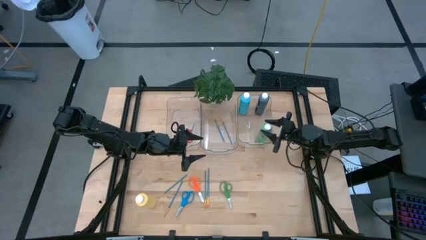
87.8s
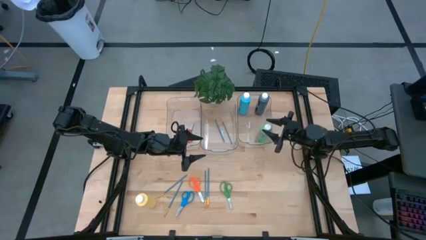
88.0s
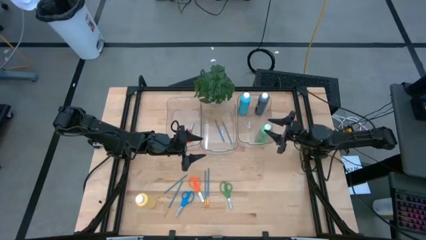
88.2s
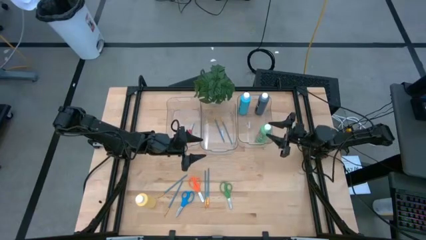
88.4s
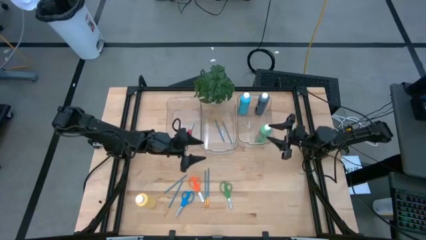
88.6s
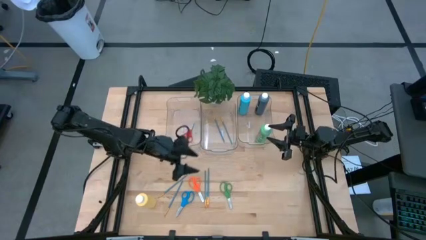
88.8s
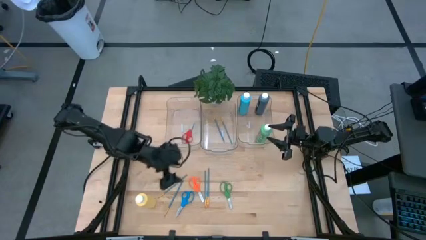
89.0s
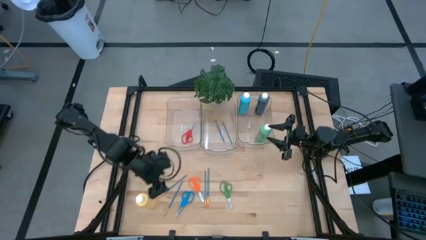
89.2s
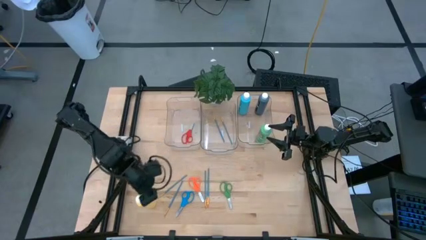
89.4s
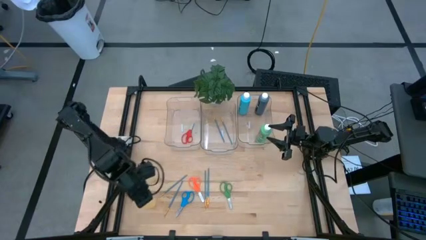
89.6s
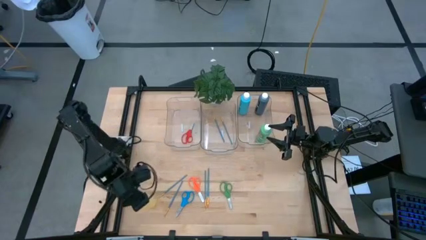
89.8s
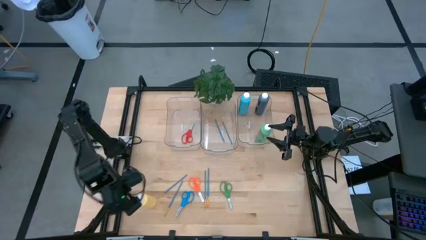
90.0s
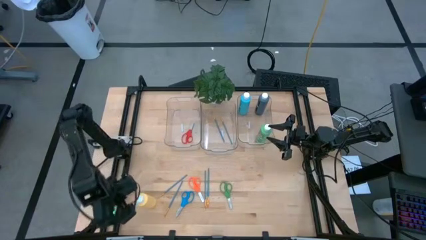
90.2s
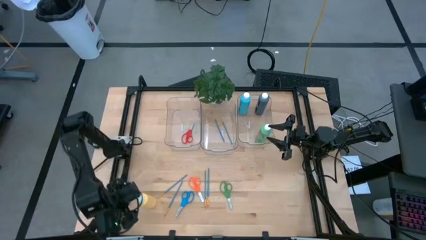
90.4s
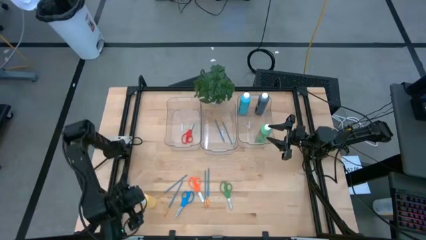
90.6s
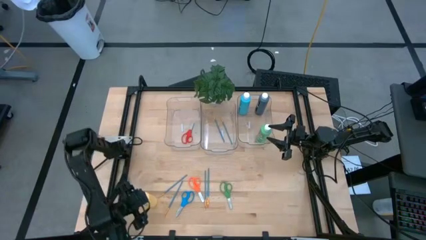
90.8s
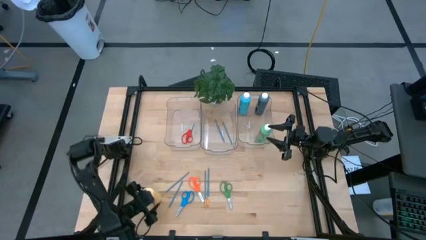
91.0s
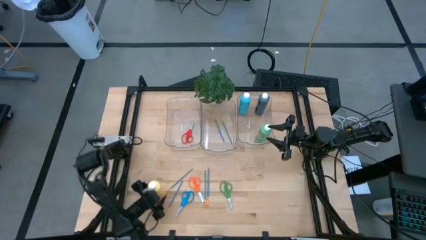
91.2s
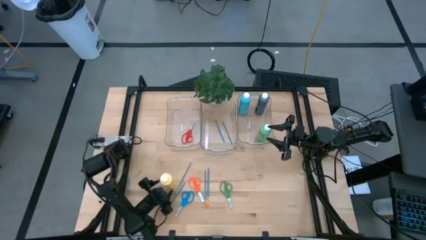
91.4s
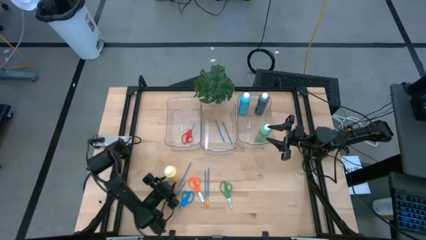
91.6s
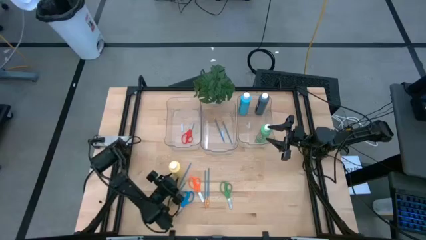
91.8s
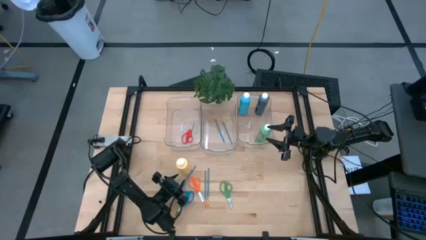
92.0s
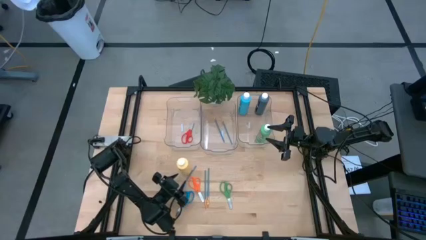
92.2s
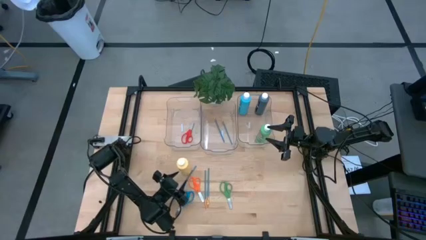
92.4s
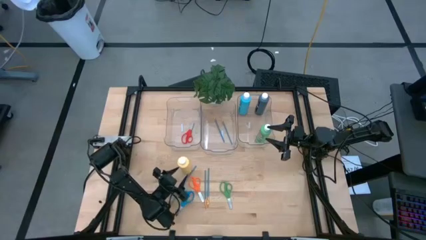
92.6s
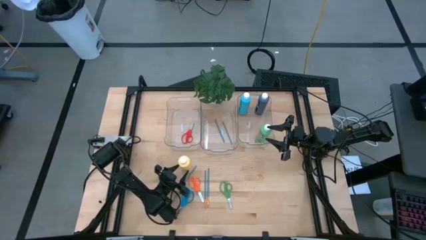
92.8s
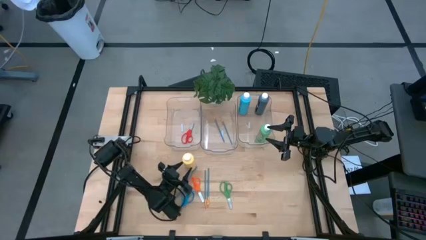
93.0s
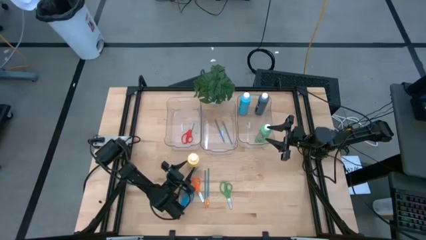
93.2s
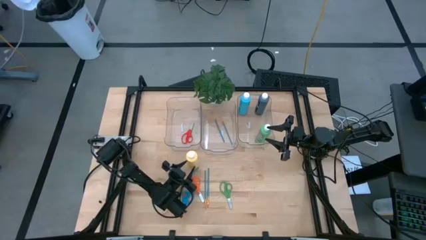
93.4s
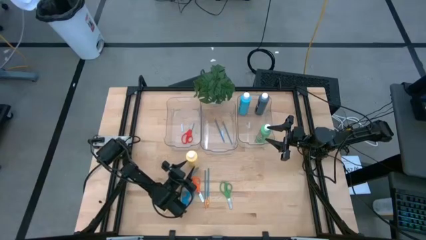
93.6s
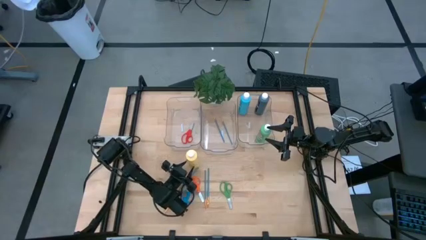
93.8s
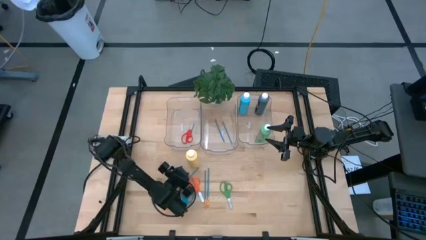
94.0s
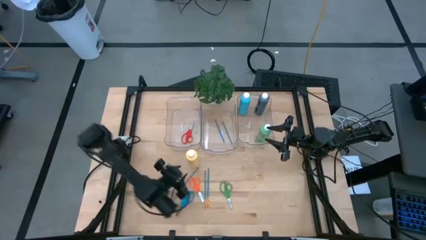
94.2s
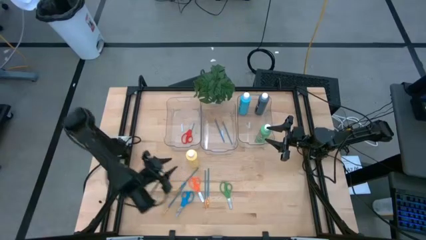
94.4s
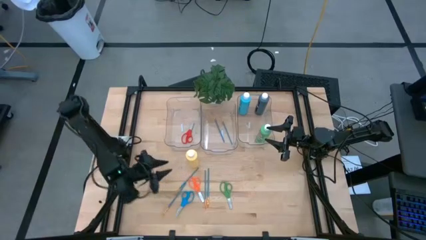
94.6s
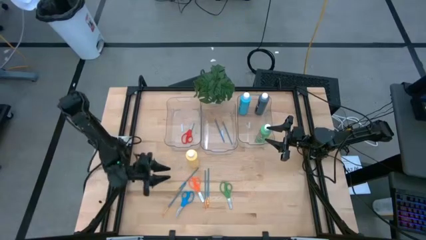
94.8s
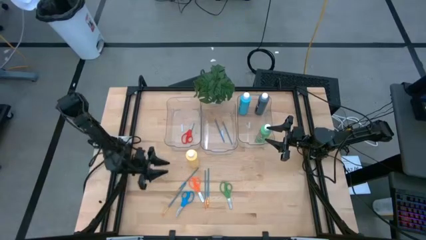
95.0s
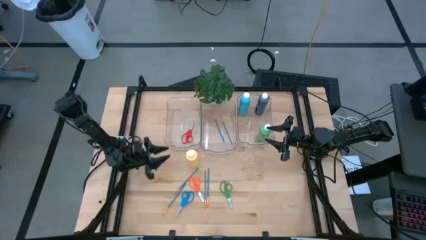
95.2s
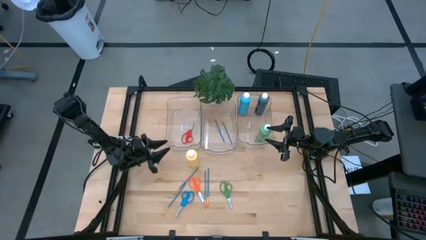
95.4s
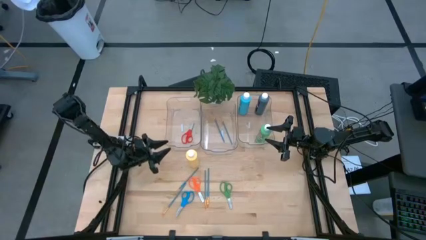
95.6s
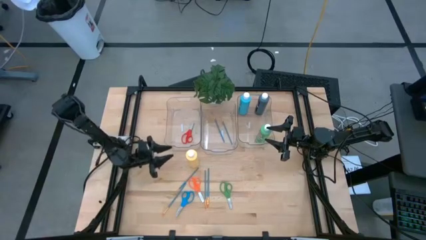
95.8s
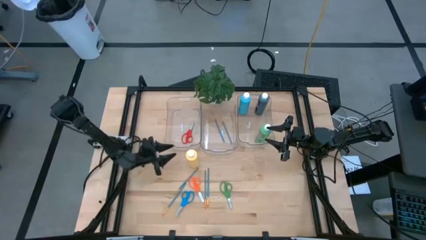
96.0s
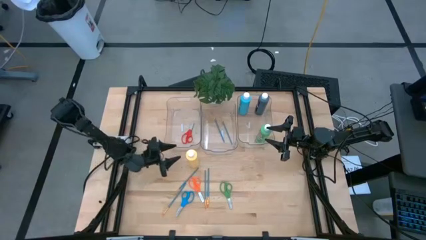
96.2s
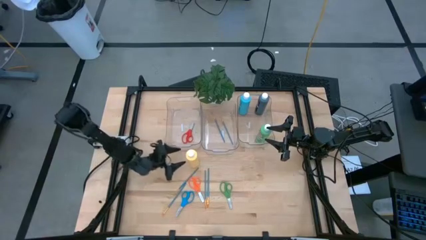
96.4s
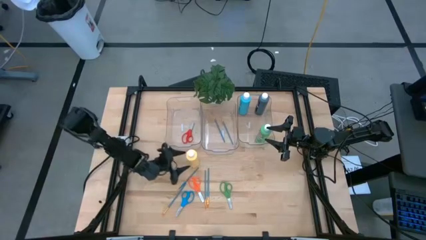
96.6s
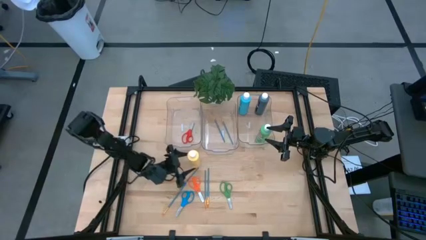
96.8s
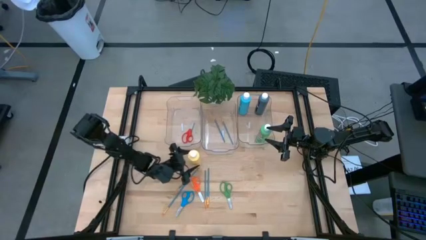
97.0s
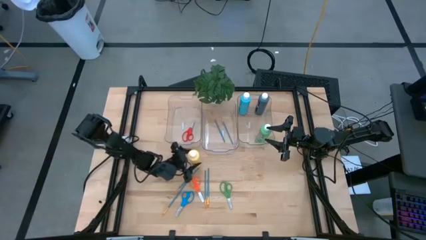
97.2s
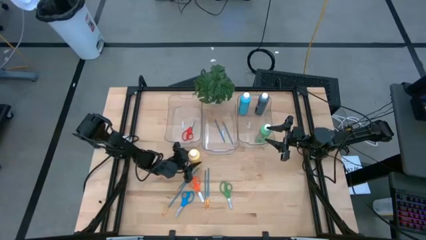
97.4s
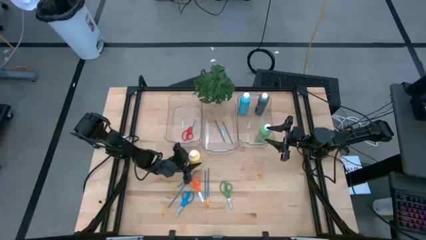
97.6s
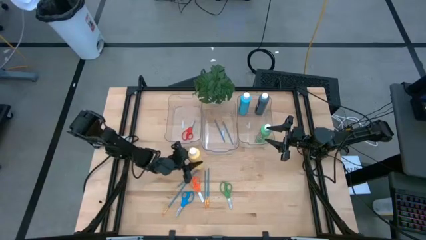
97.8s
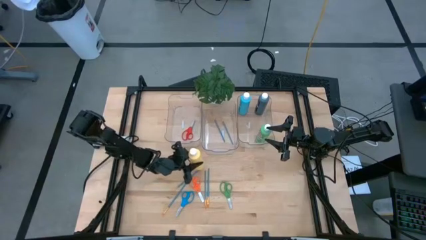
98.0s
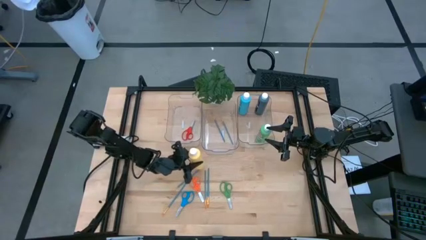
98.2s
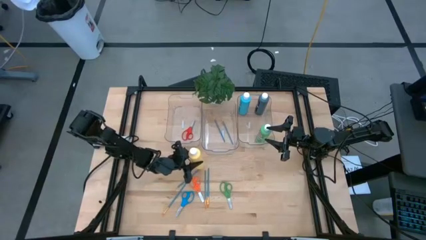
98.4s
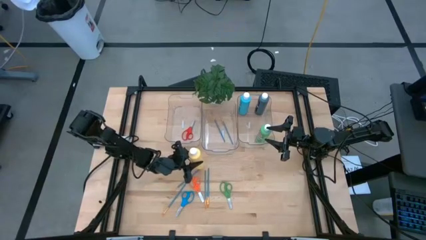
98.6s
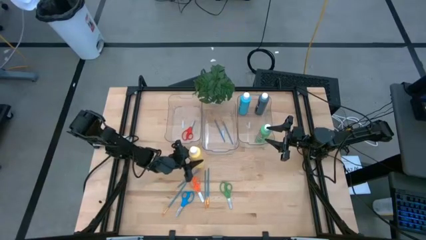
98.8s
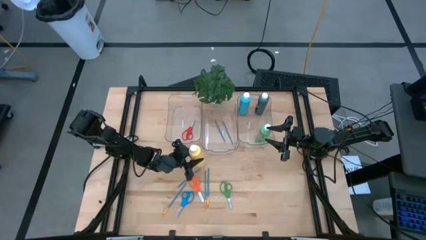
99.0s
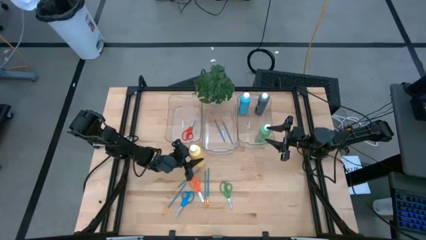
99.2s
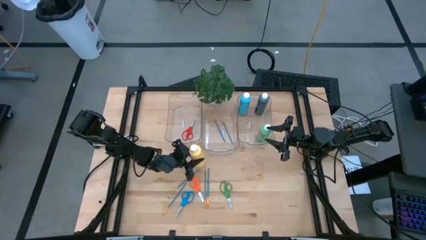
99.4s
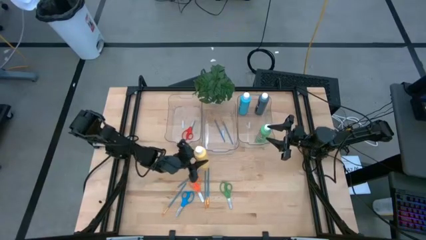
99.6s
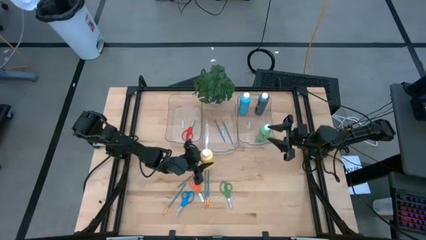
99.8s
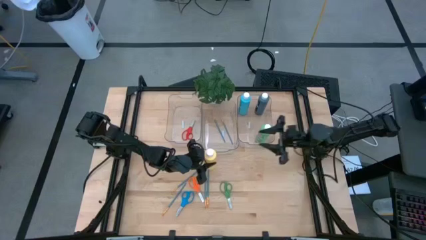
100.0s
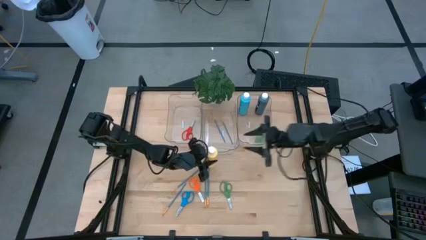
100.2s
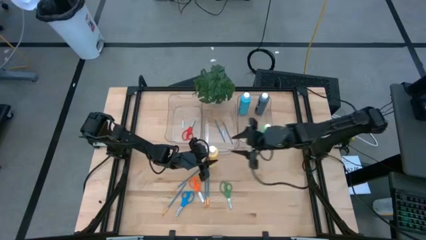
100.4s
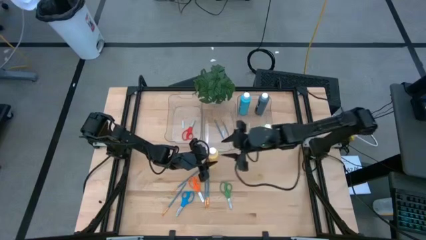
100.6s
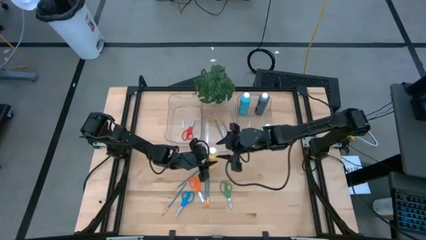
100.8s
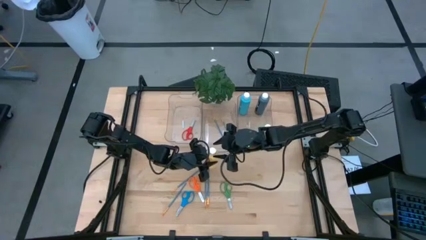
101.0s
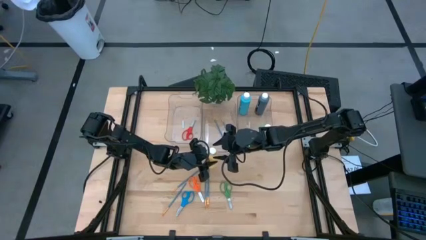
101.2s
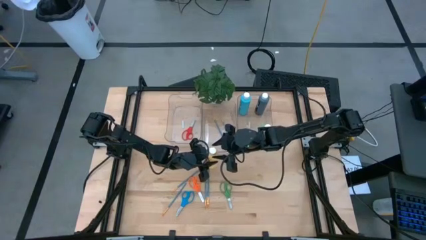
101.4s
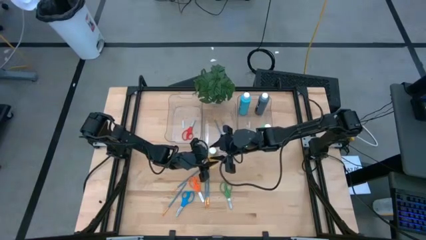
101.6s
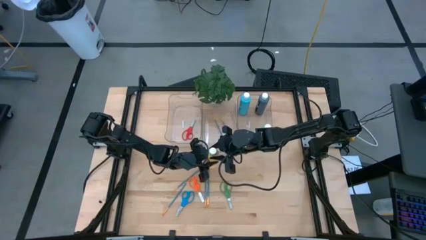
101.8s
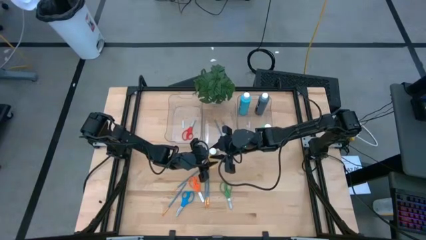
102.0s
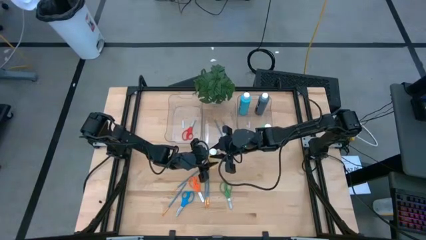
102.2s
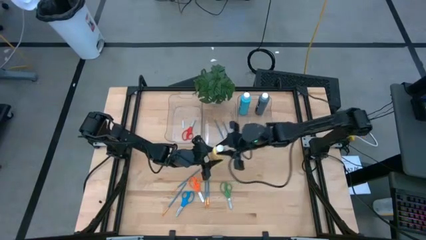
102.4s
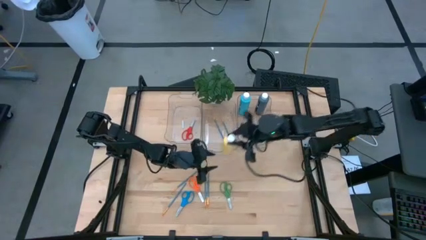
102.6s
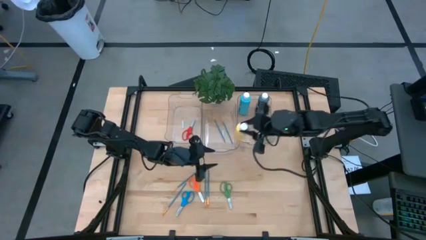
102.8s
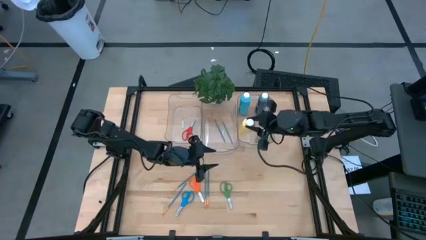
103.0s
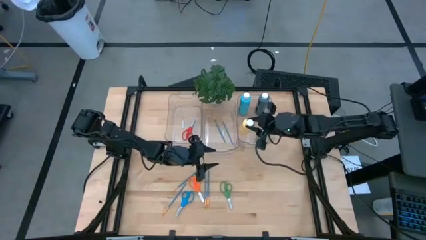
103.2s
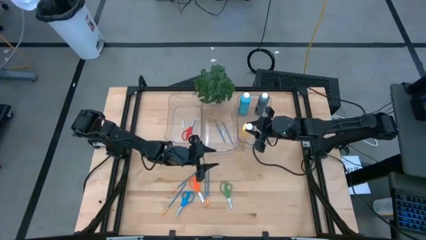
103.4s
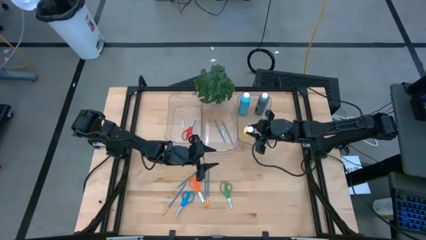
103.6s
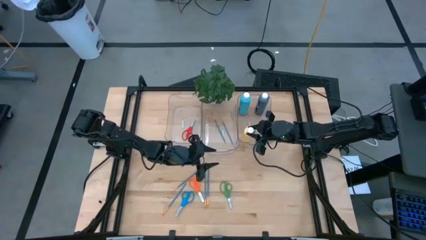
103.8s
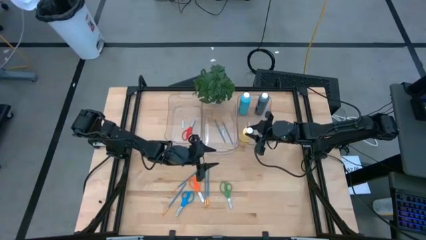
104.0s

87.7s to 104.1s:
Task: Pick & Place Paint Supplies
Put the yellow paint bottle into the right transparent bin
